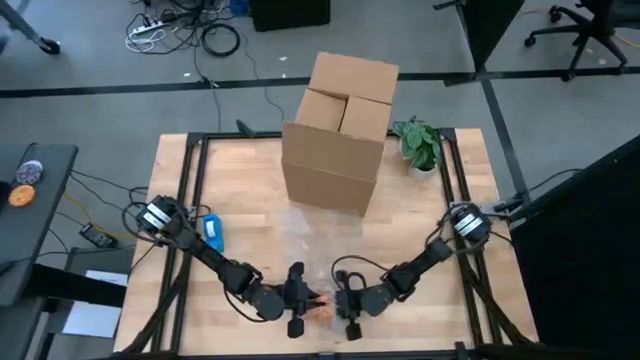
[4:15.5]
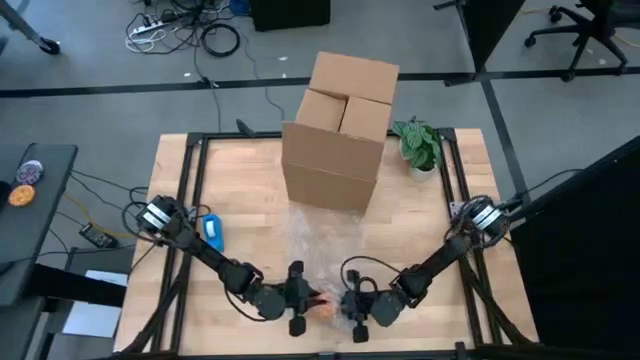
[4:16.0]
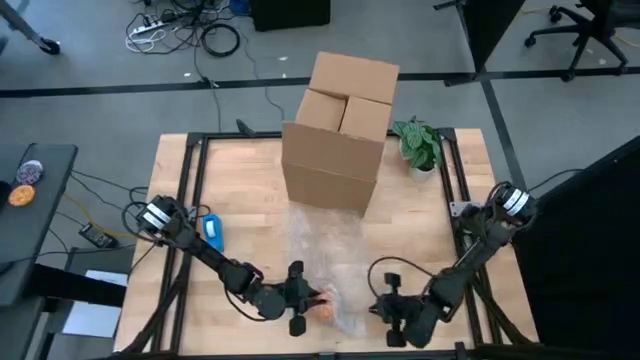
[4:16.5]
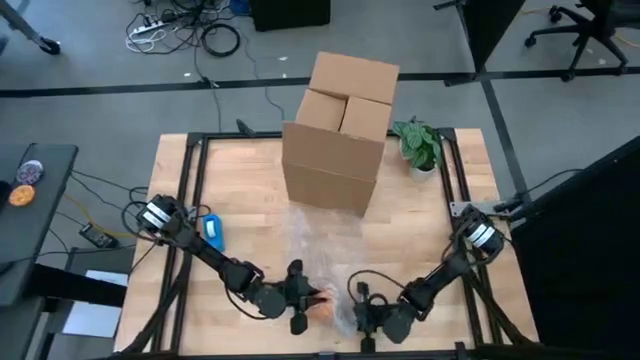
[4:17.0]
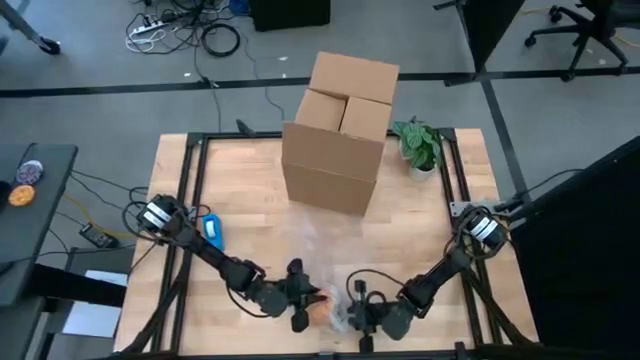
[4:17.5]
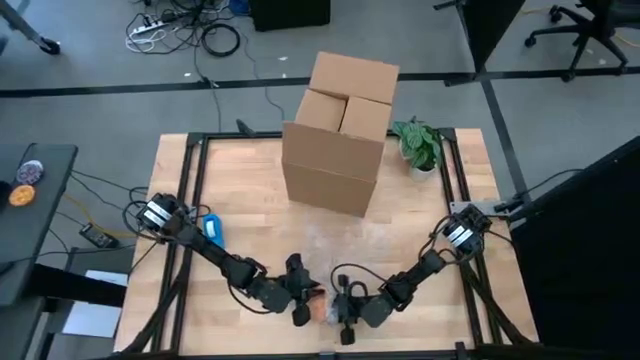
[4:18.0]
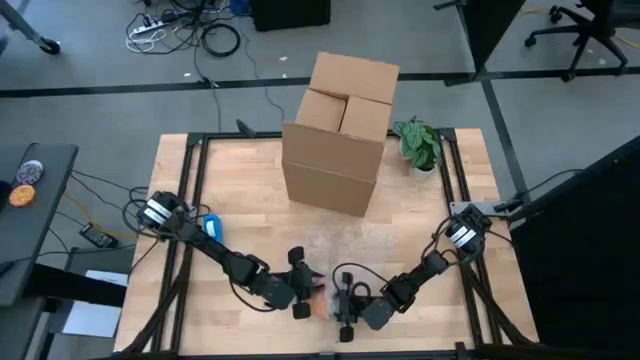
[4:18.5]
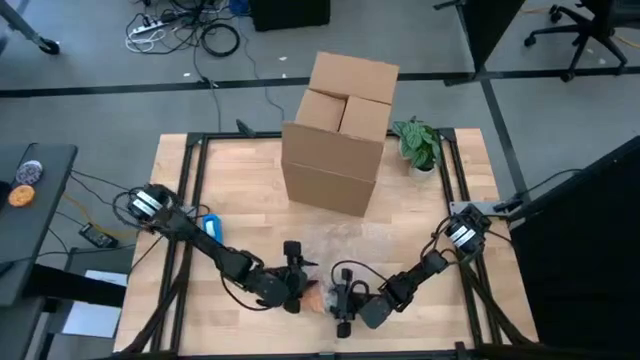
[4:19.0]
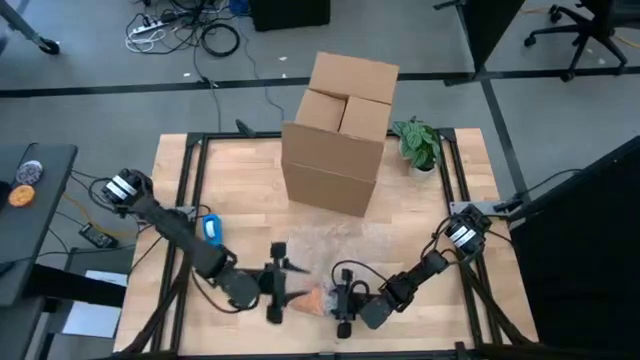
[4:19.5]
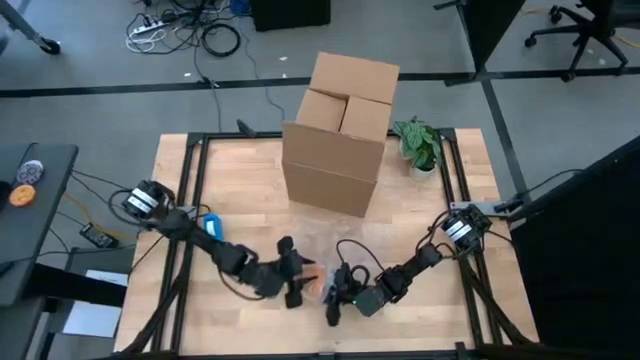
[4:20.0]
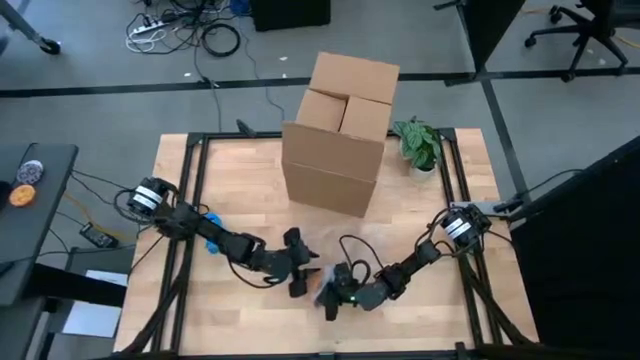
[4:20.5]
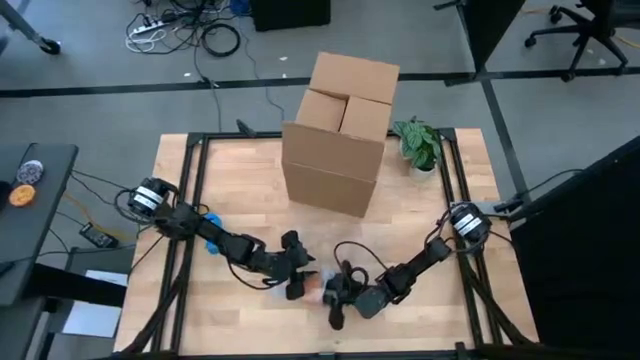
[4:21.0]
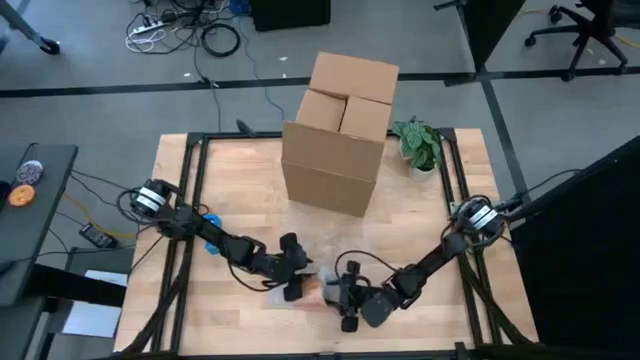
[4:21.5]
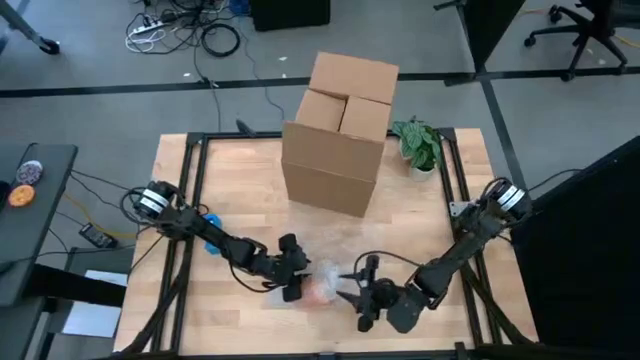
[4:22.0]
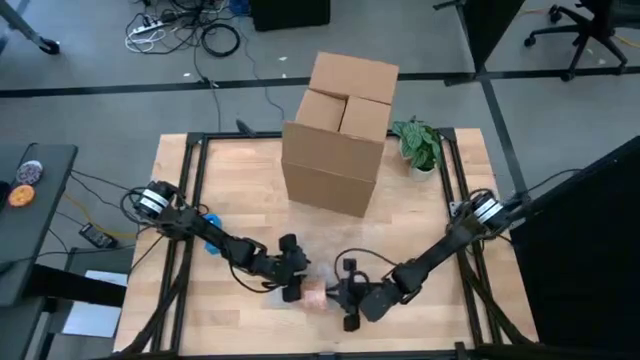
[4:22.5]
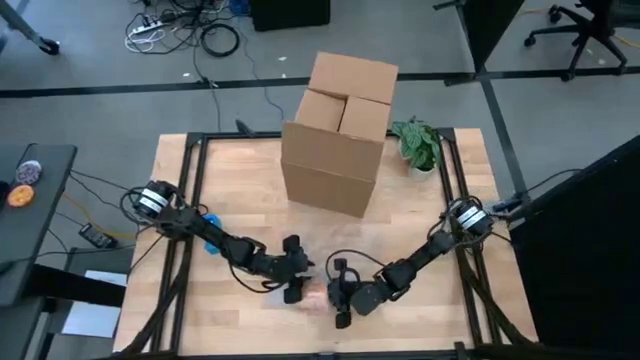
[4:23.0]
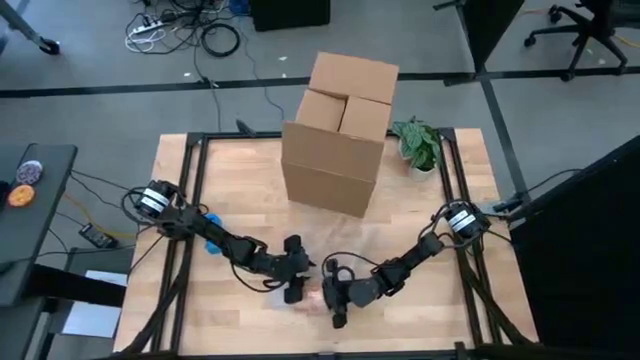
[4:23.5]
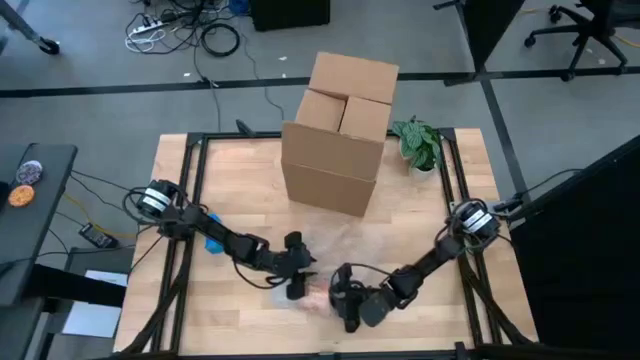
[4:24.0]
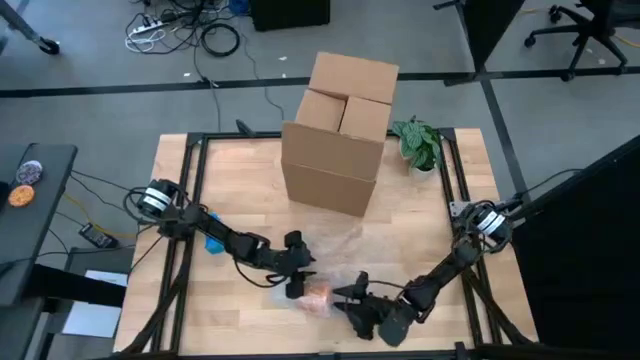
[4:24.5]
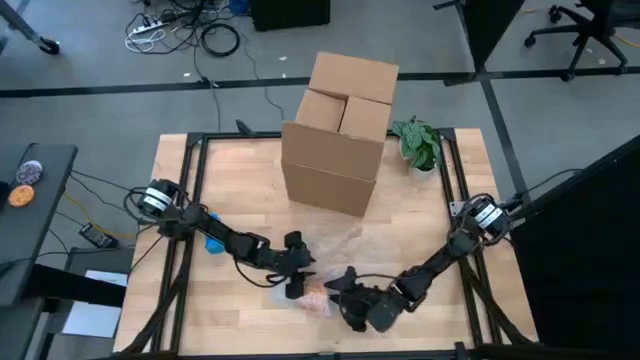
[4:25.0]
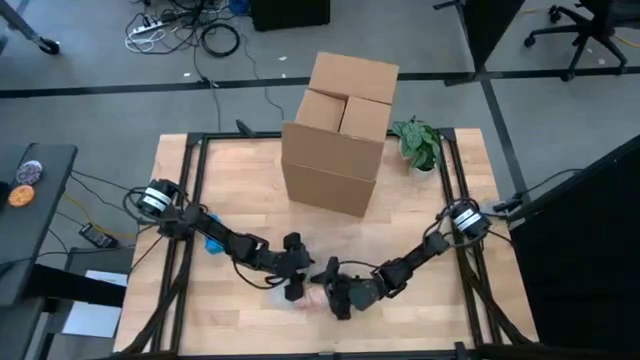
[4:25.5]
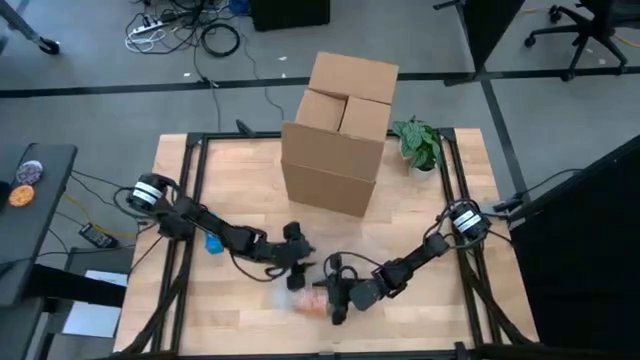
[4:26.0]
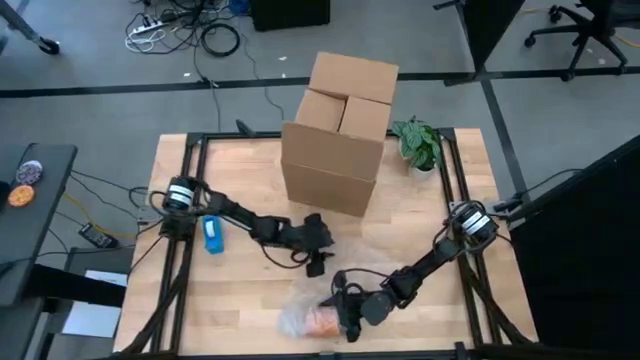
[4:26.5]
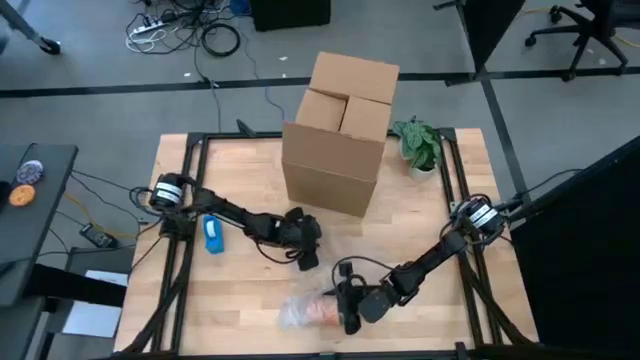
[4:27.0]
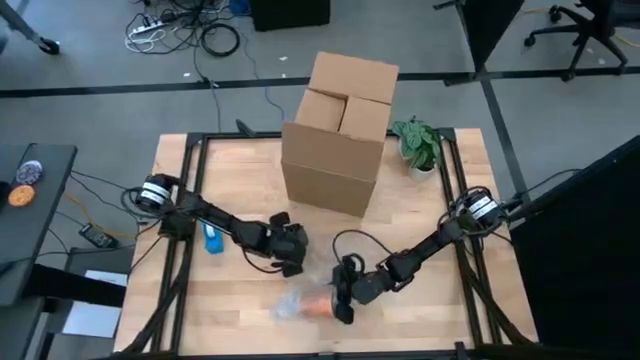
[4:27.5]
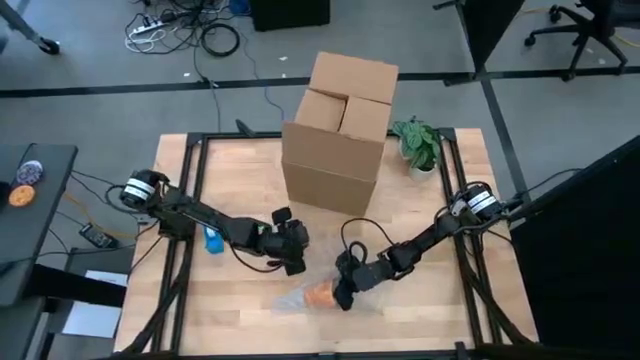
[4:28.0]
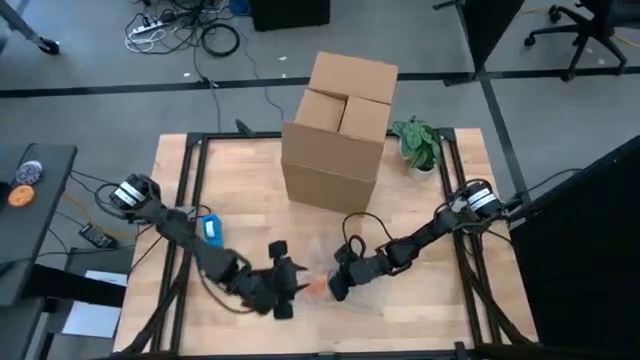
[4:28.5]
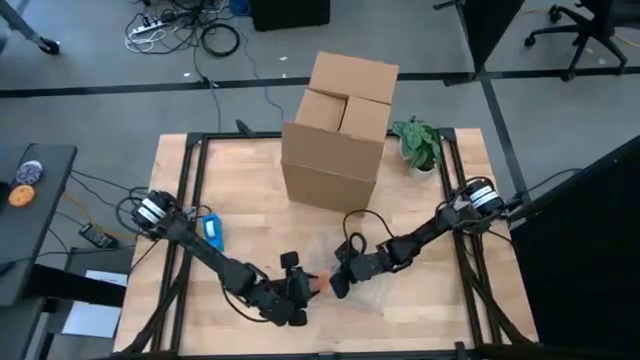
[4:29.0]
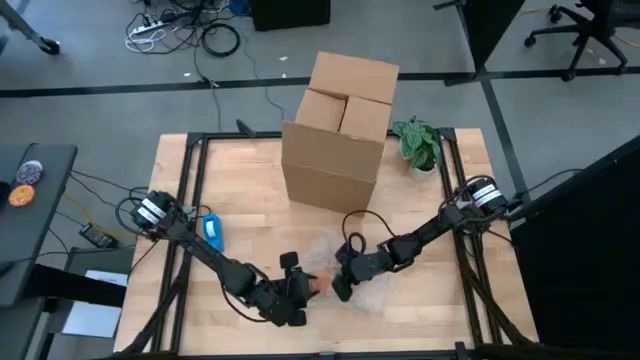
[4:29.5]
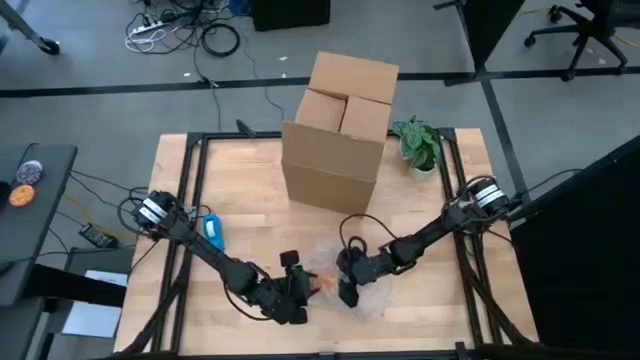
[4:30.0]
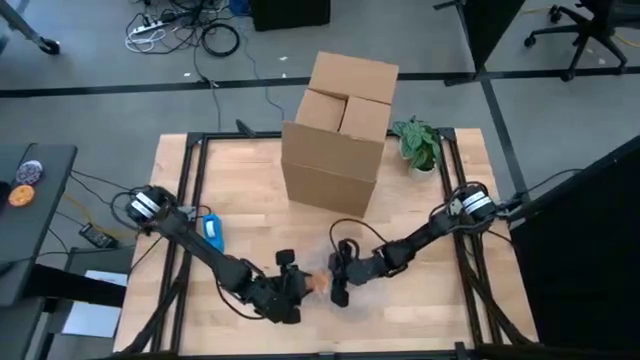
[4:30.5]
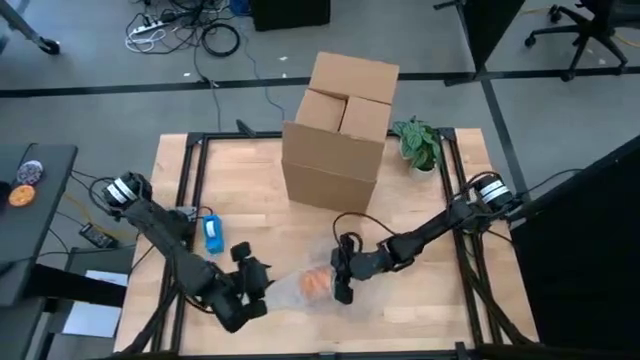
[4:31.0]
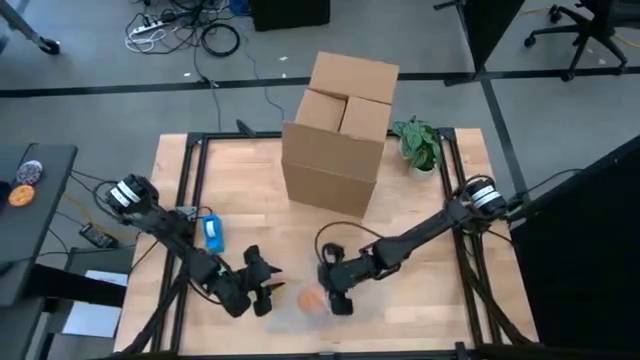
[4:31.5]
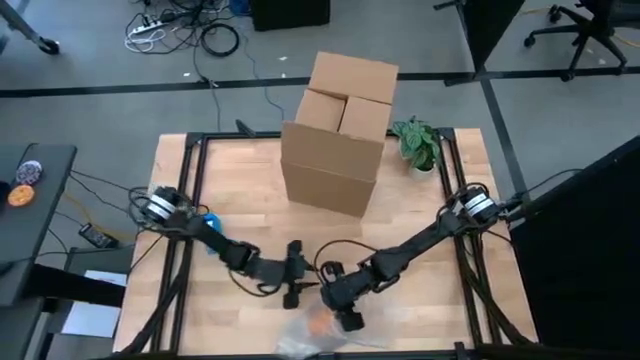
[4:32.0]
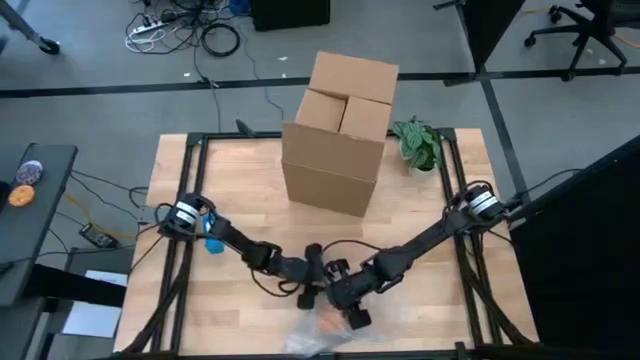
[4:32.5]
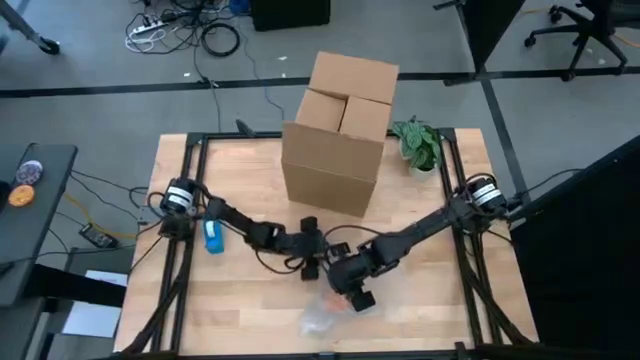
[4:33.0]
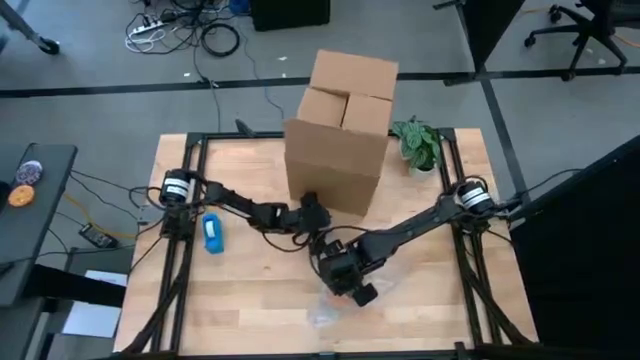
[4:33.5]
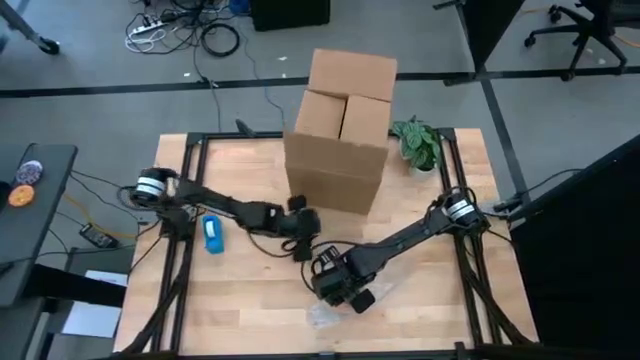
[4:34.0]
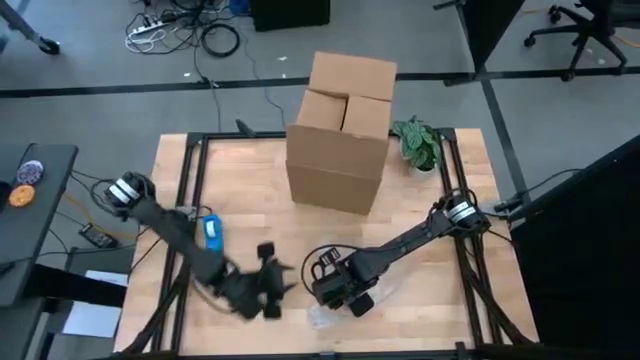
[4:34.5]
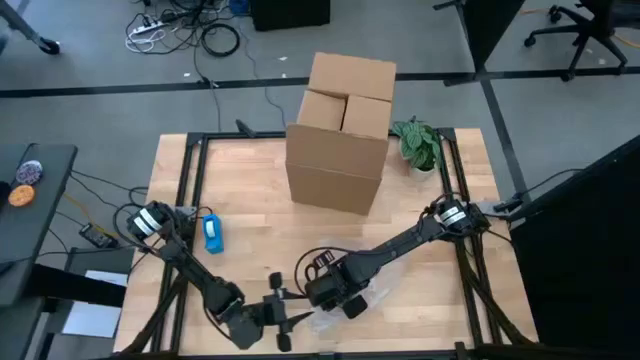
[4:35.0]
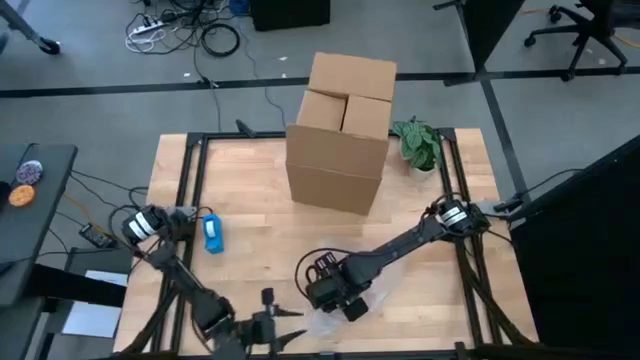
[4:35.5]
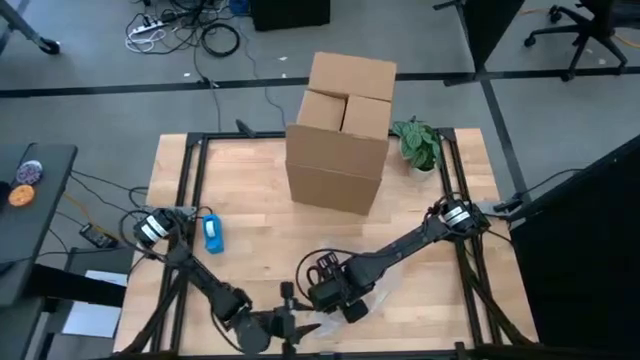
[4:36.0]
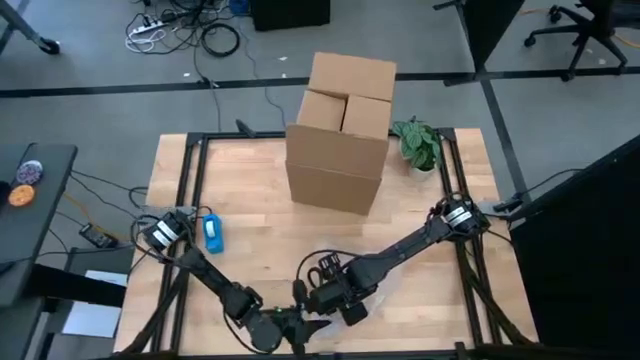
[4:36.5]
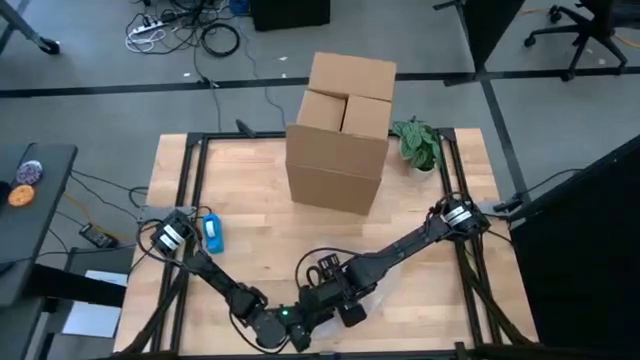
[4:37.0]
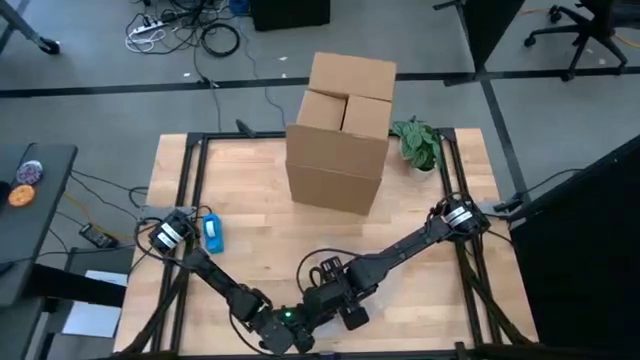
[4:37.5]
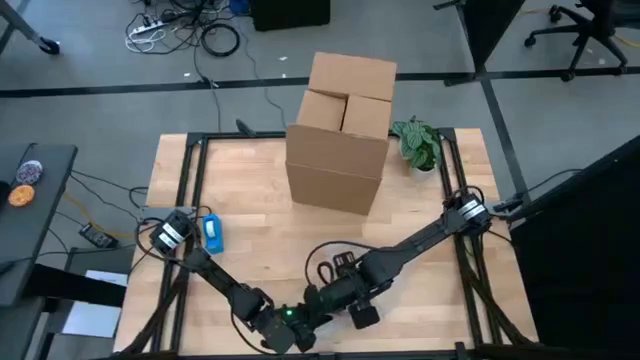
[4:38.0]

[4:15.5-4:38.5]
Task: wrap mug
Wrap the orange mug using the transparent bubble wrap
